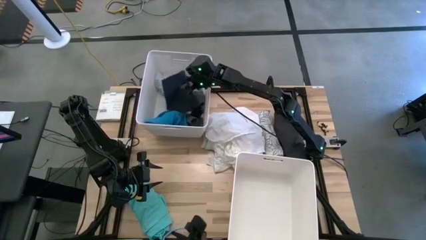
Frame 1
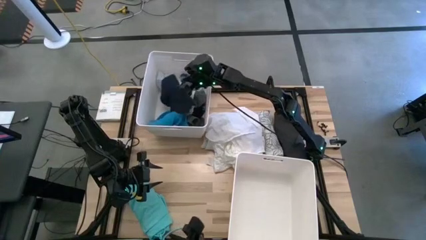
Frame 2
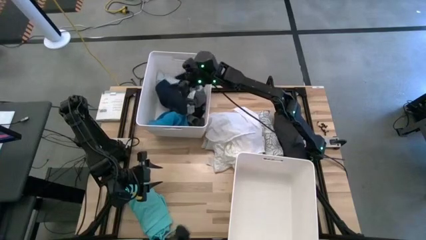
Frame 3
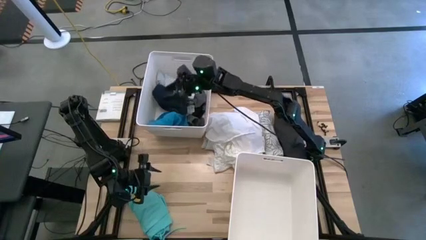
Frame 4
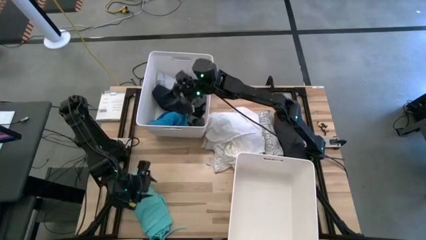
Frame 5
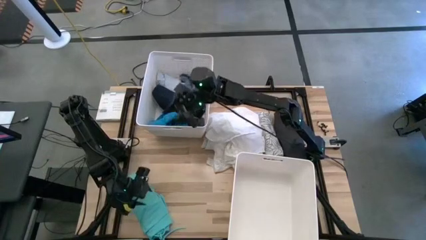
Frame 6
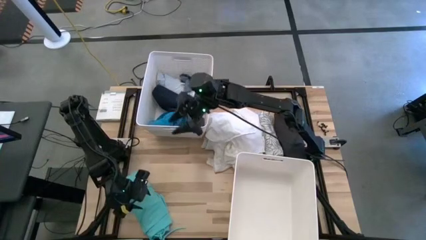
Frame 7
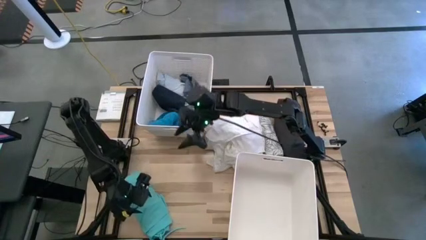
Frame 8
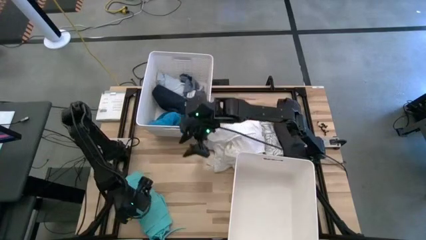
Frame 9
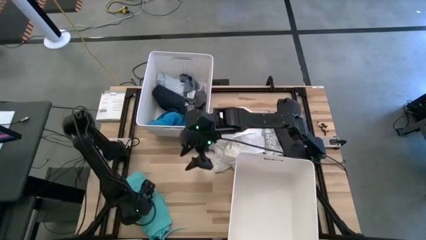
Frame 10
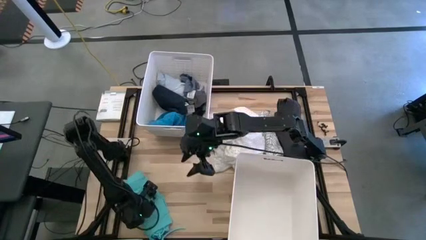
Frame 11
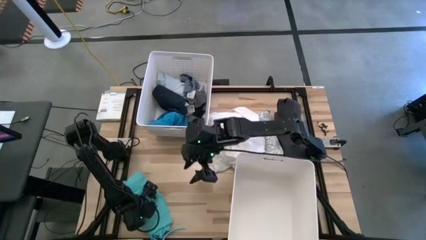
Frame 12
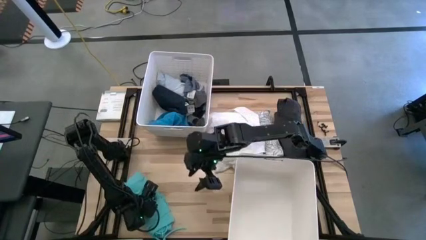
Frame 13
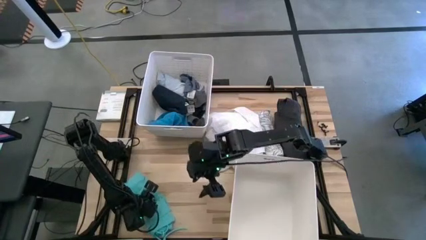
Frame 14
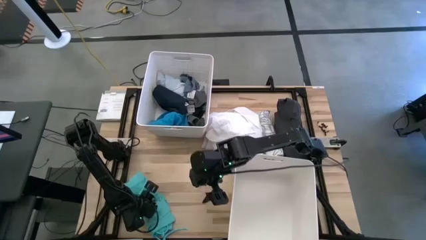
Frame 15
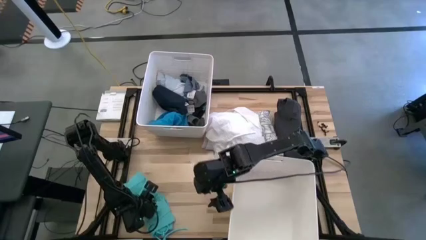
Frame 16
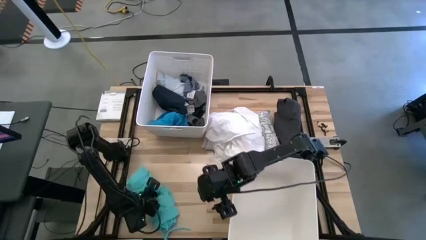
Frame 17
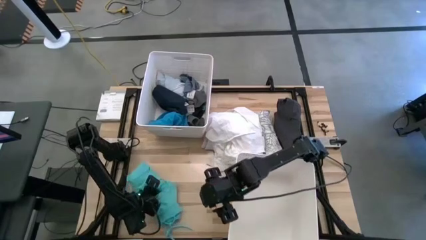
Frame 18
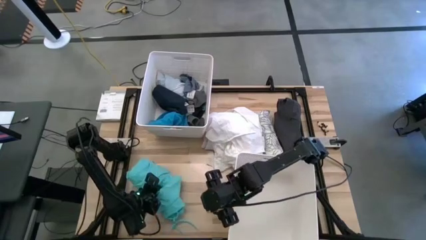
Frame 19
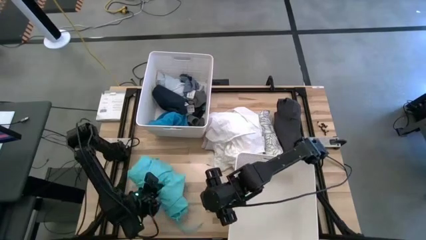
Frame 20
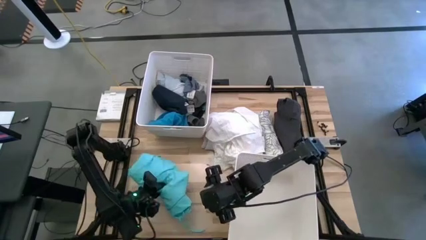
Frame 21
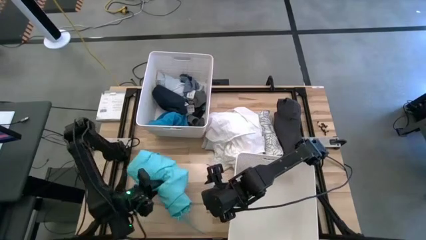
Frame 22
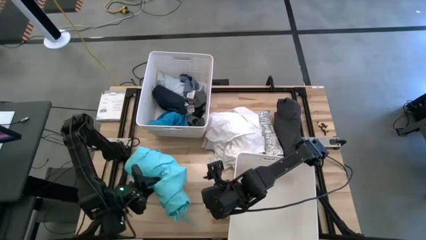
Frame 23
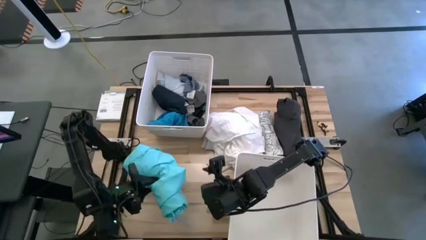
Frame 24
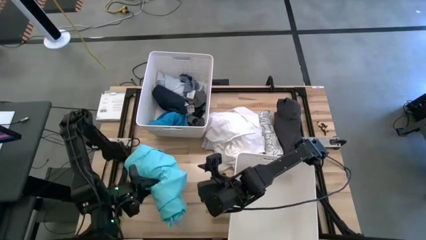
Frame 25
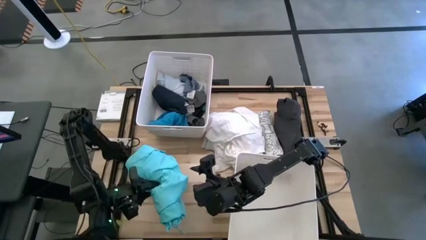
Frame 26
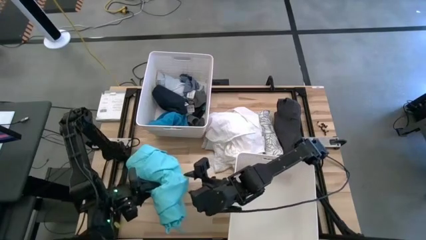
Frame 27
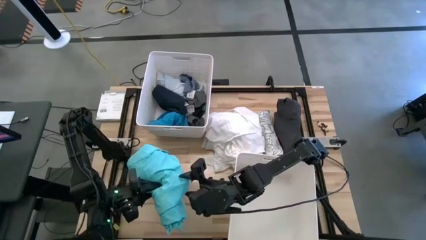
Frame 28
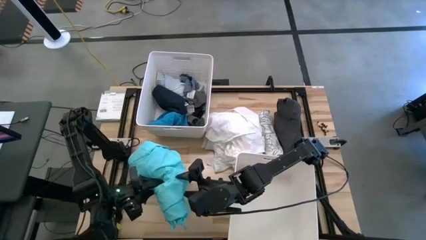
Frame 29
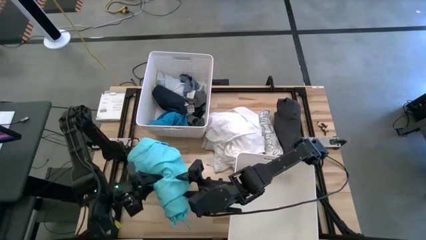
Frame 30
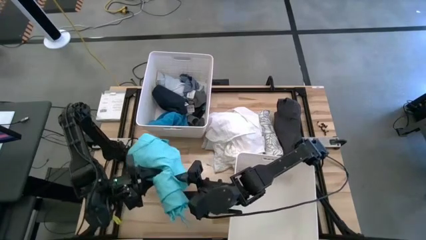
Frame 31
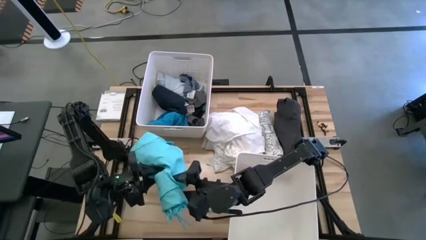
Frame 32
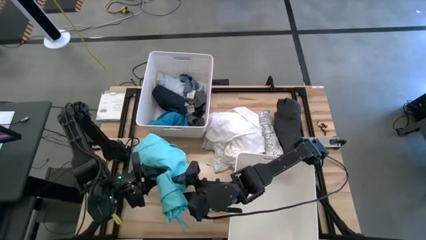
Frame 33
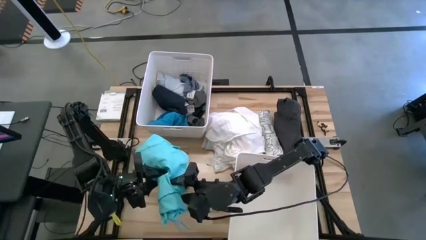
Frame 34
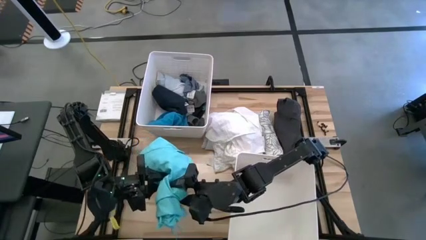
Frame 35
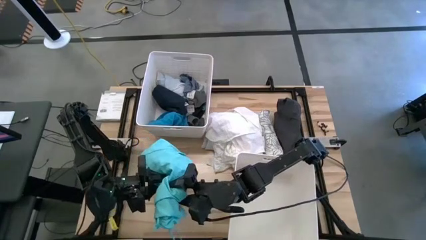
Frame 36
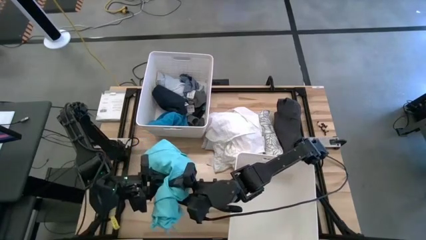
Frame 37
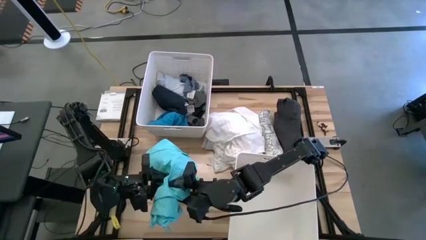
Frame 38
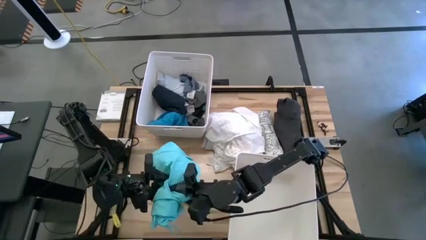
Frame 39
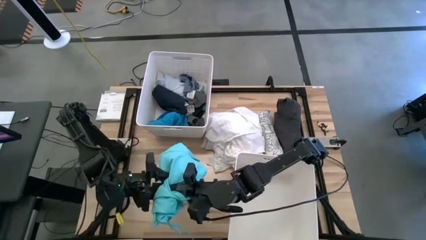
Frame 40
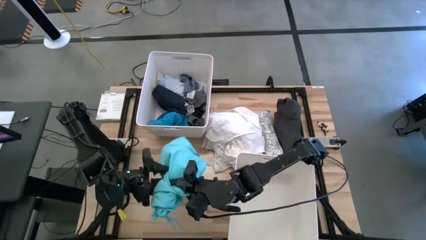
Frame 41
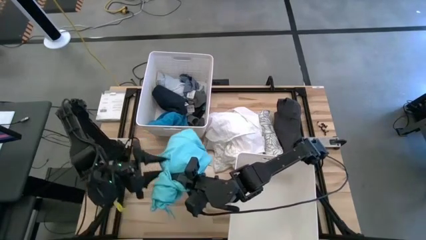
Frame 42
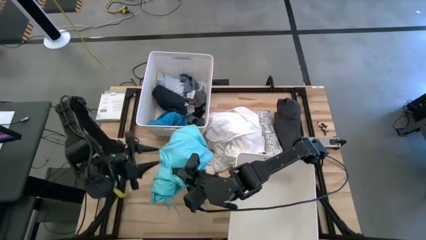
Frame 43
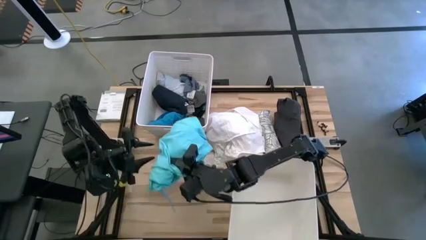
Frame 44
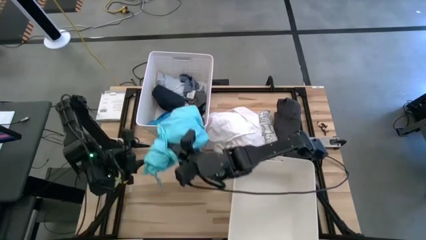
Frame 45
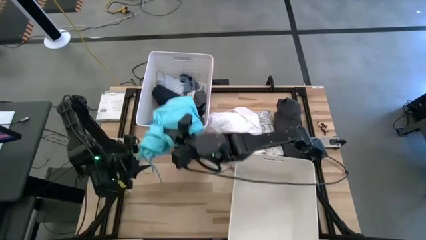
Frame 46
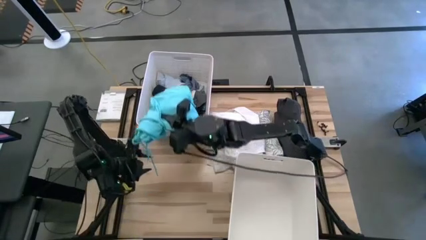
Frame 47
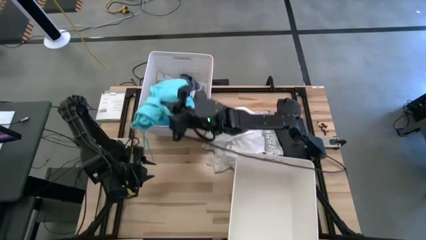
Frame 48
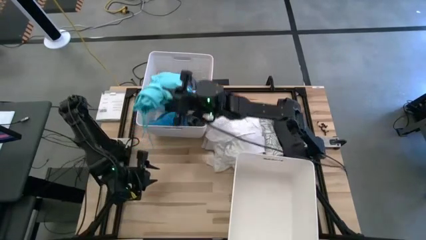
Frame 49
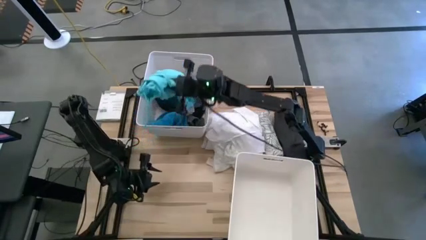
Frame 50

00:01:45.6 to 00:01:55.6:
Task: Sort clothes
Put the light blue shorts into the top white laundry bin

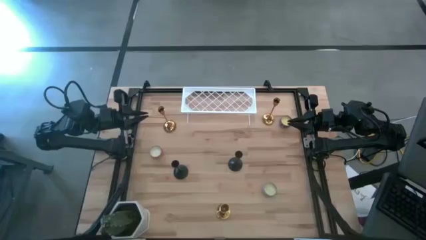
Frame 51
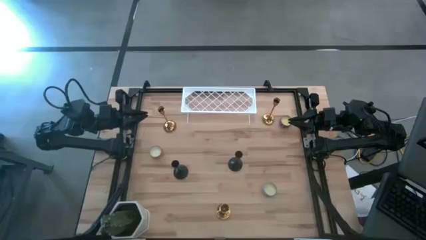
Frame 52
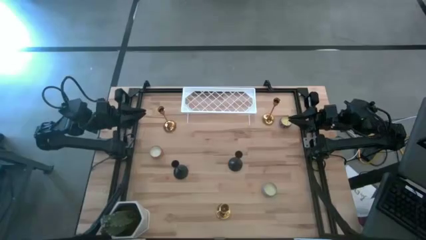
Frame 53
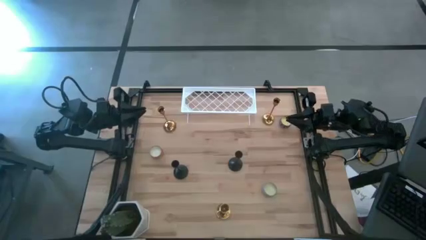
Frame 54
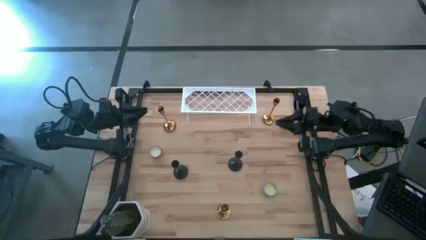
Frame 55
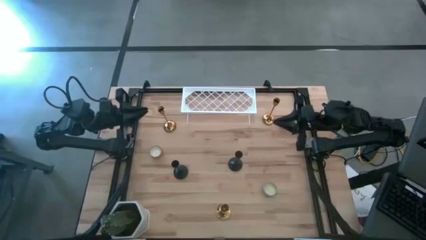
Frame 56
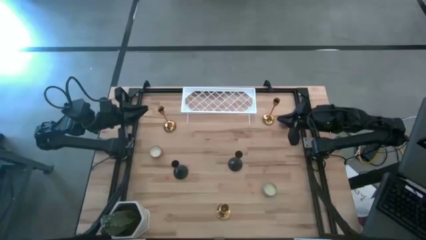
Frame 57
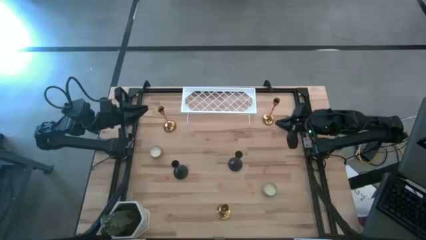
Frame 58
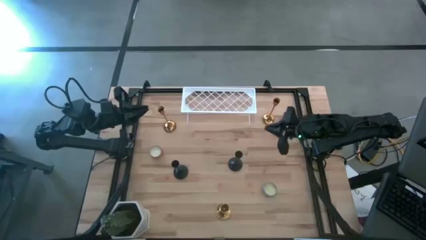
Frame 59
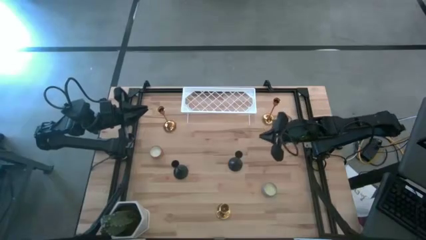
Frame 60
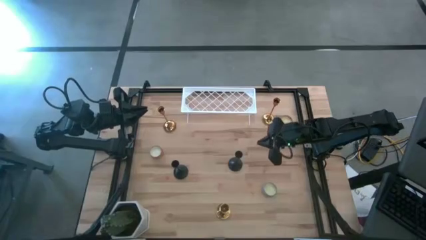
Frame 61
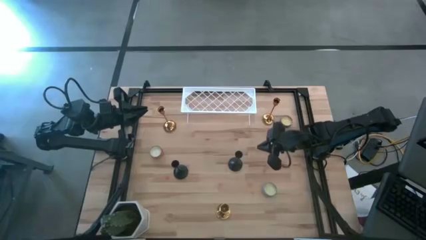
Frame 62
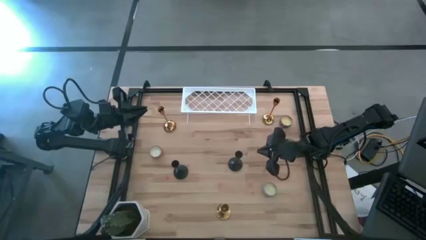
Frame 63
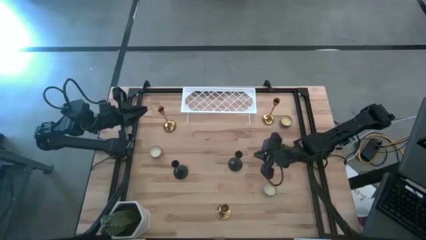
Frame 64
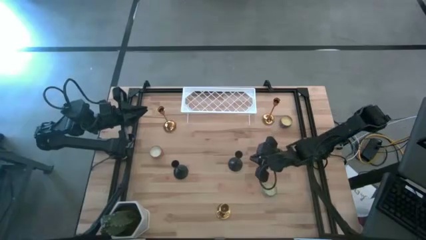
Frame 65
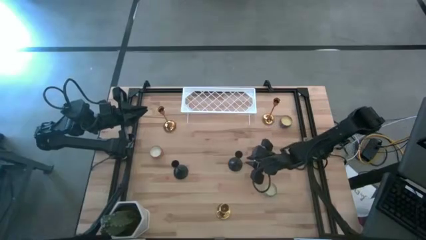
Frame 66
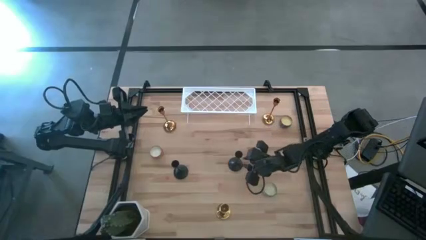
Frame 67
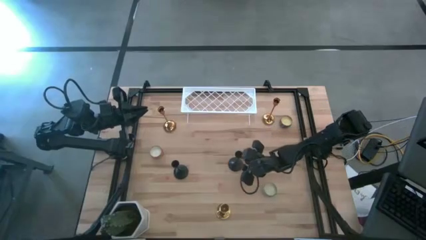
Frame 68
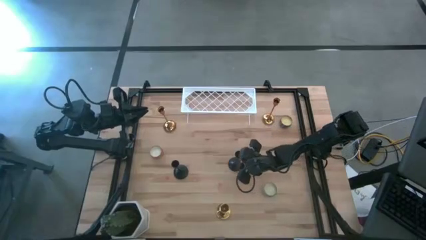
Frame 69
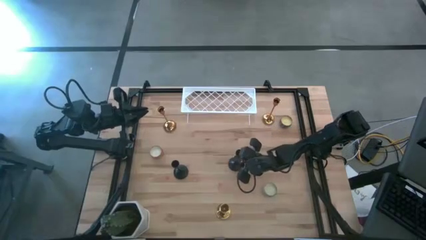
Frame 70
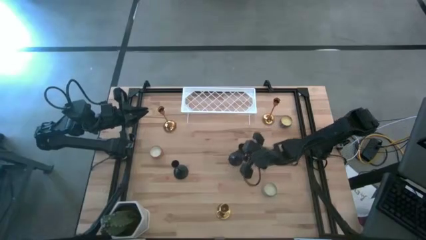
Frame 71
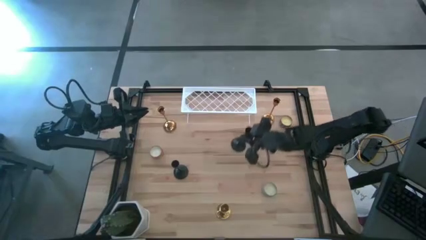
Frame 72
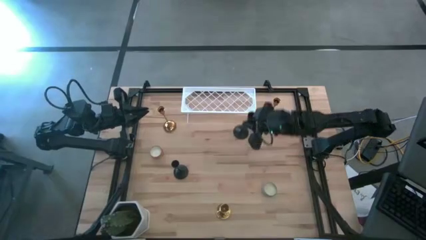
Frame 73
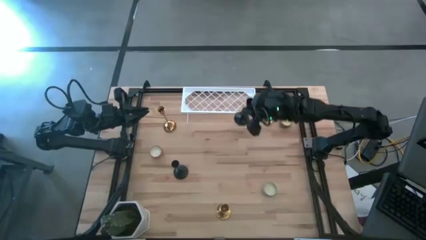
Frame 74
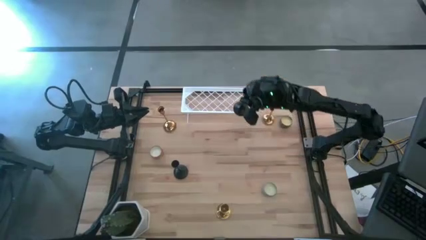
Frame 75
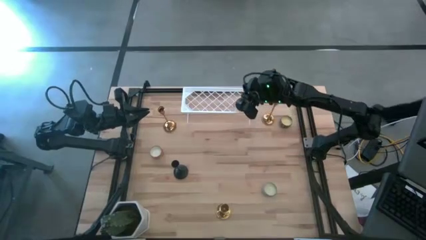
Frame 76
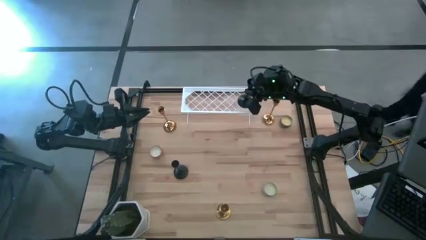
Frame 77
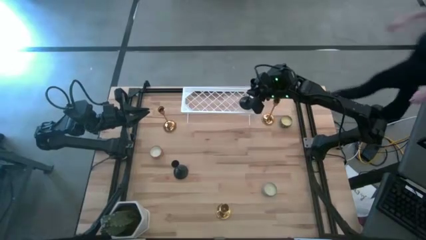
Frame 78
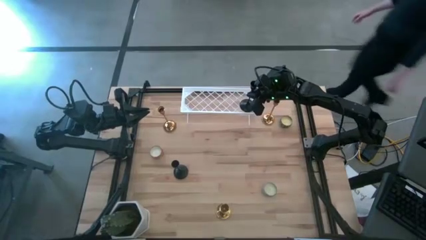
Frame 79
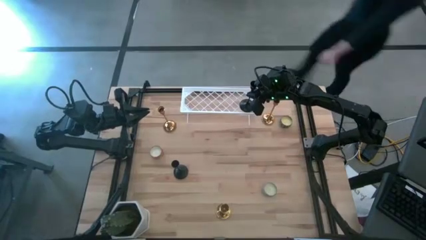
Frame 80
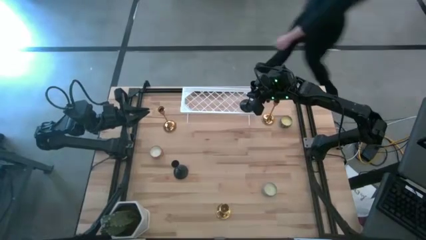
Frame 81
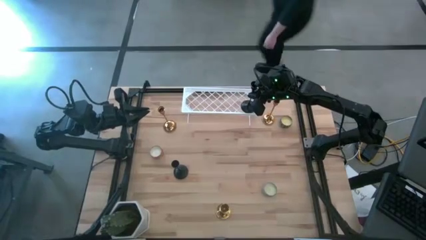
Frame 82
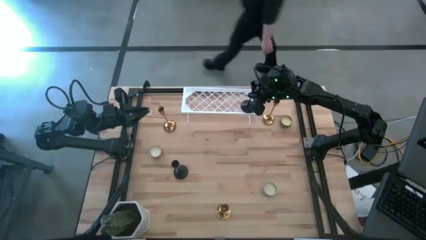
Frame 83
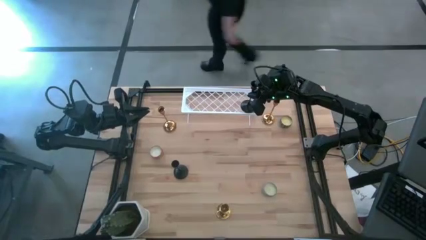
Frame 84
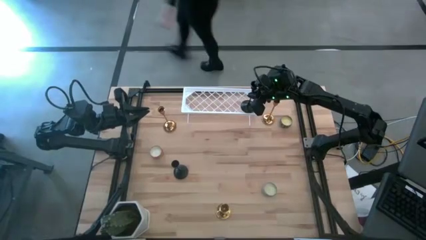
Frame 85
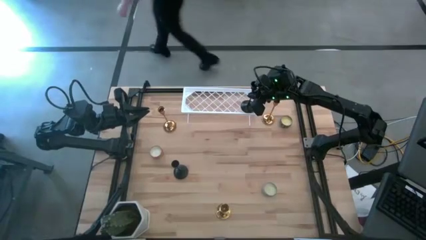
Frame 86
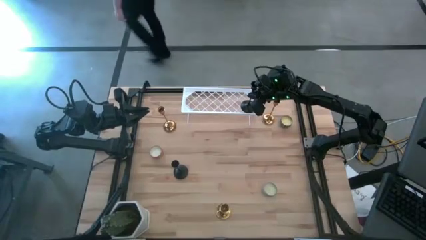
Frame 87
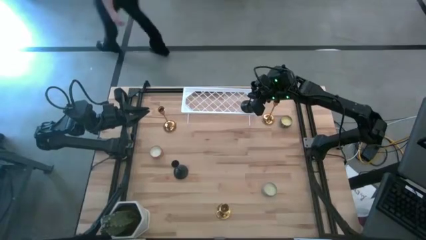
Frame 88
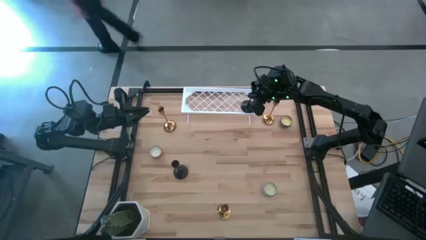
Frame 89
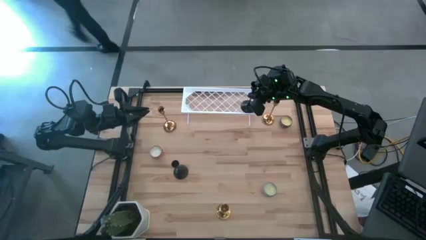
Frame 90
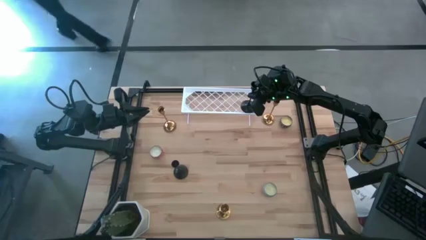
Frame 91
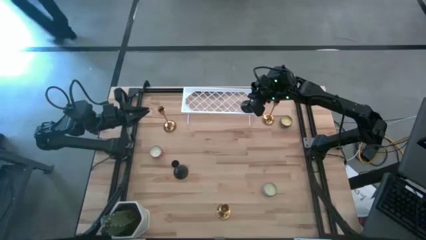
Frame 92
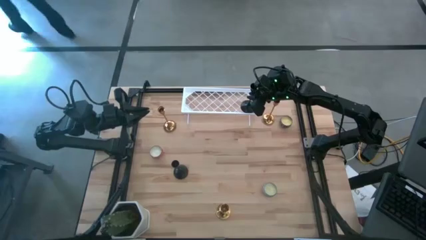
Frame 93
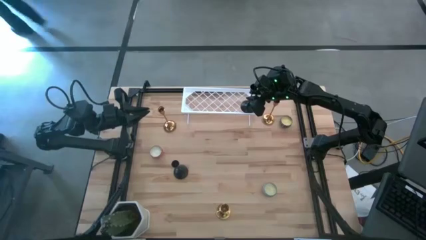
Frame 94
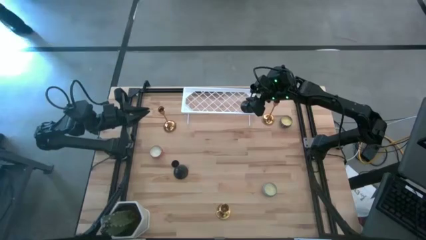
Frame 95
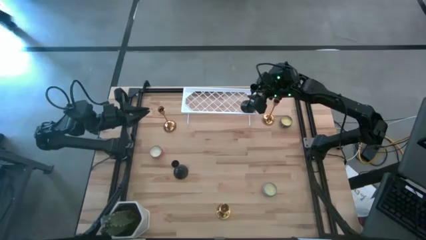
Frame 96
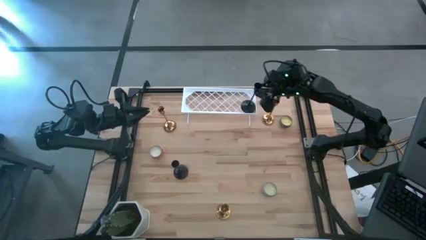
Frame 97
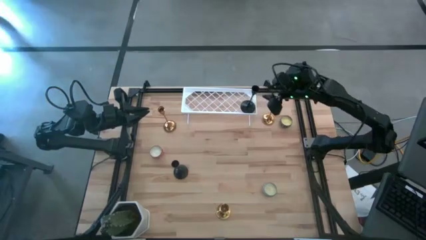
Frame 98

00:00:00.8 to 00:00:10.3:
Task: Pick & Place candle stick holders
Put the right black candle holder on the shelf
